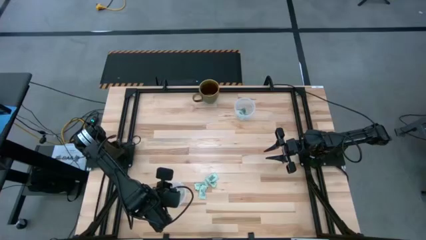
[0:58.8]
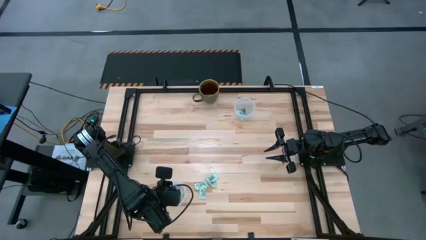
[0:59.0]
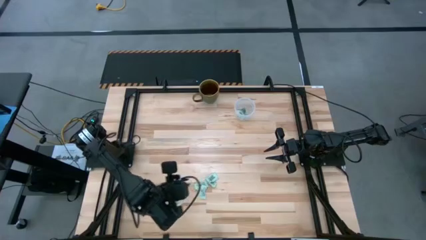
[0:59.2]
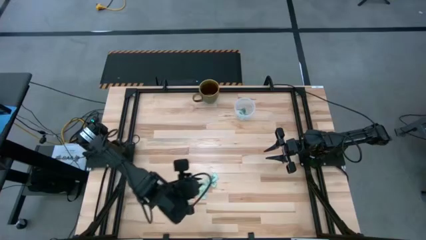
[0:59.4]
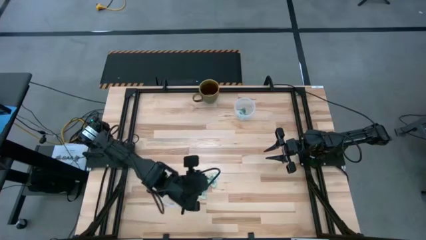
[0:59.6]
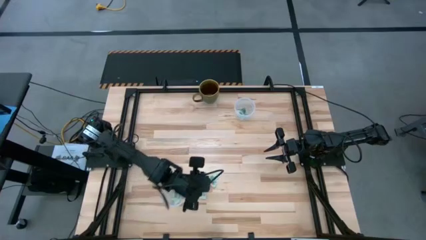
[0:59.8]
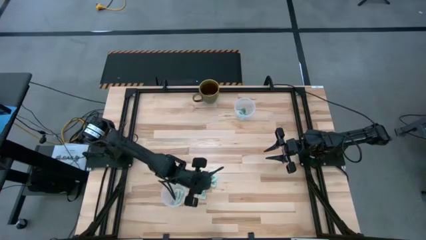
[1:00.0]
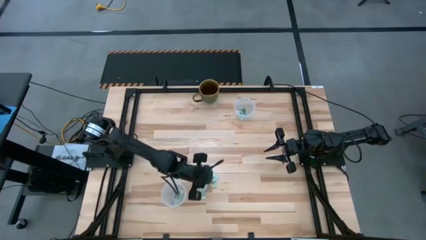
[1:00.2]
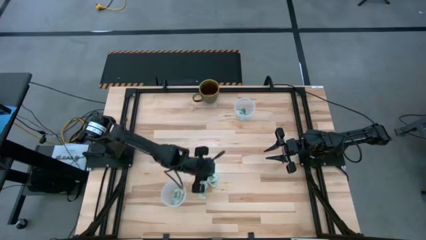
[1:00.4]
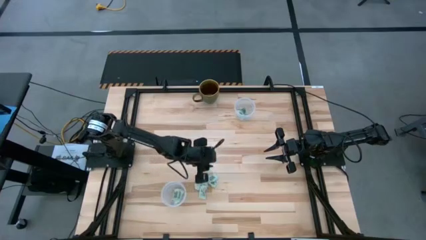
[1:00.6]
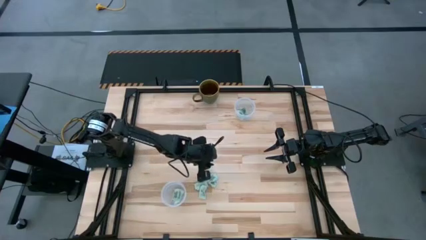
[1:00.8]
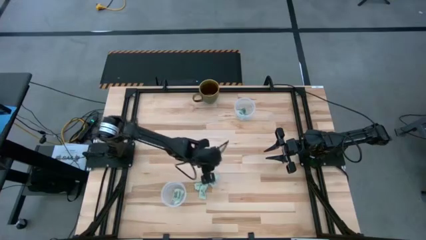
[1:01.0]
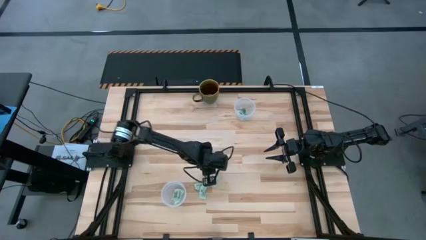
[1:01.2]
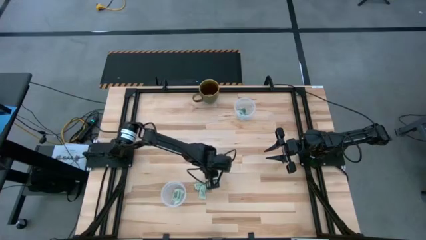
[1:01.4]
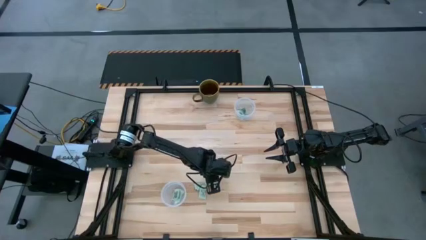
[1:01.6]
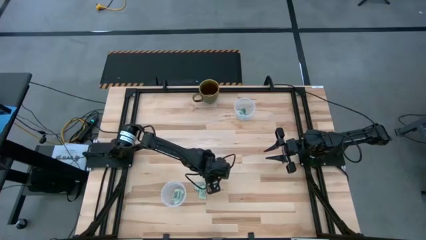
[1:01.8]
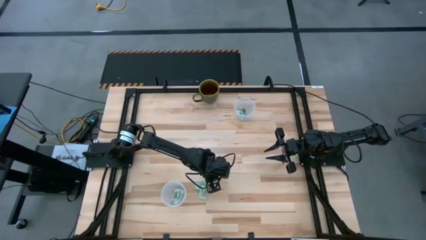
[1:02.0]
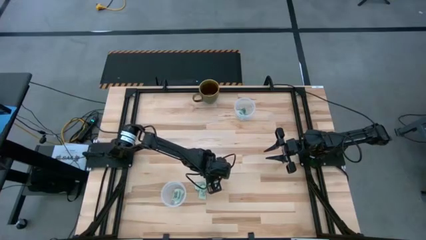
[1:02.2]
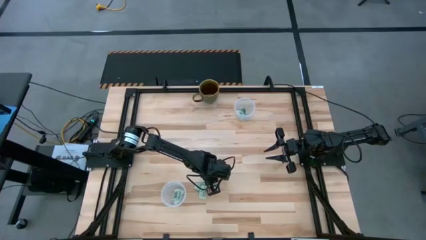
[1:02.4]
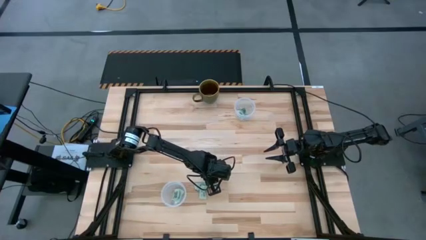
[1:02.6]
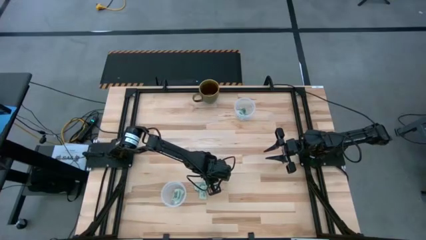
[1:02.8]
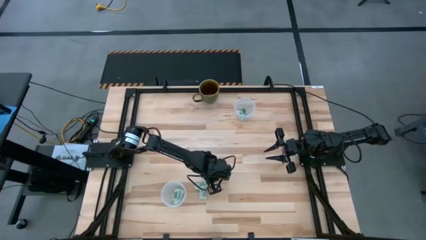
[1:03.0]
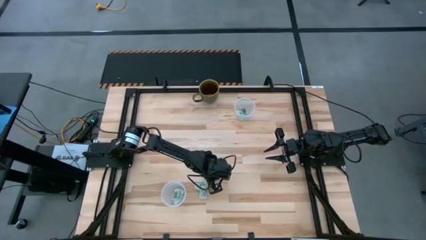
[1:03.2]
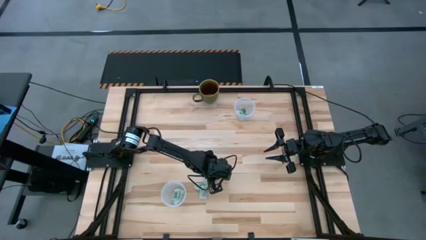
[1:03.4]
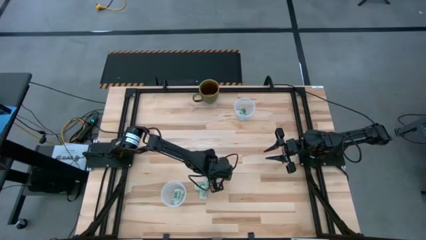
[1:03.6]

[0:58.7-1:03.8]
Task: Pick and place items into bin
Put the stevia packet into the bottom transparent bin

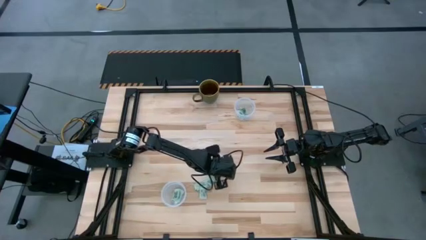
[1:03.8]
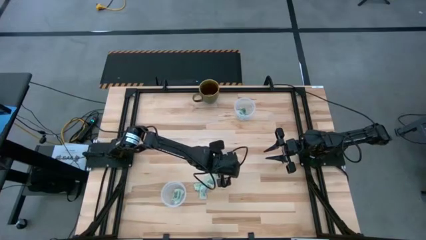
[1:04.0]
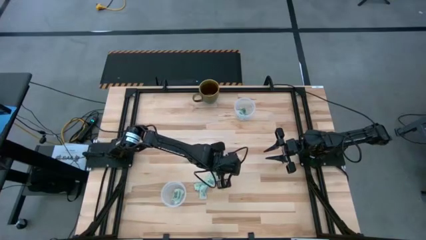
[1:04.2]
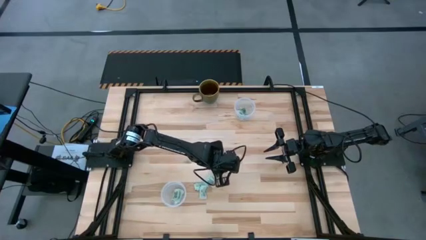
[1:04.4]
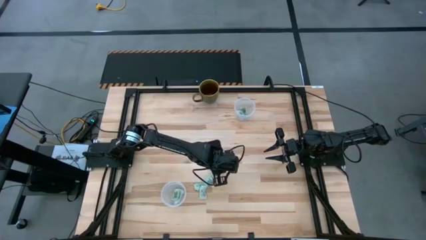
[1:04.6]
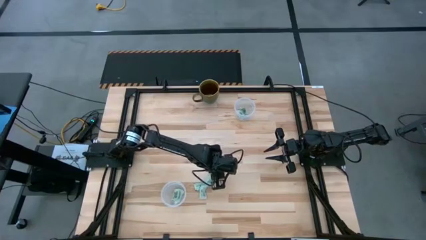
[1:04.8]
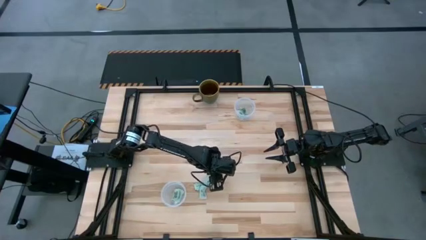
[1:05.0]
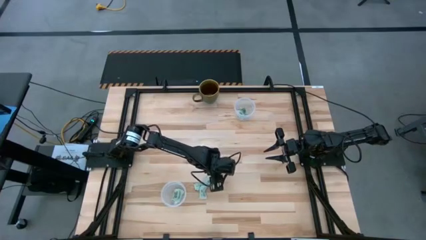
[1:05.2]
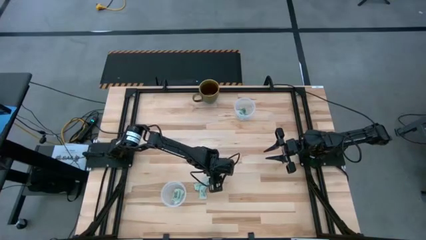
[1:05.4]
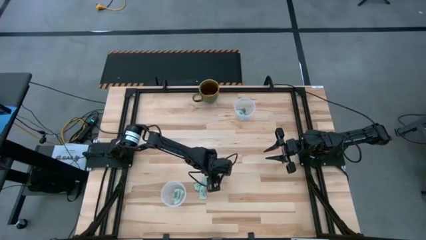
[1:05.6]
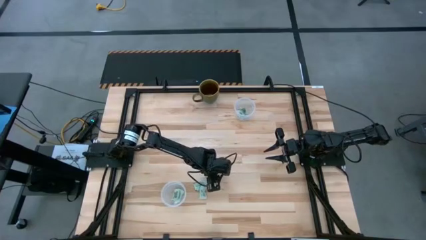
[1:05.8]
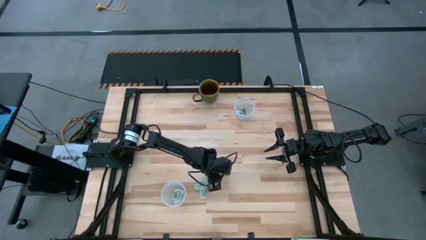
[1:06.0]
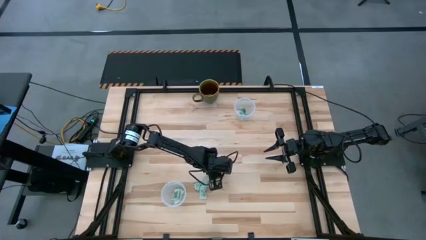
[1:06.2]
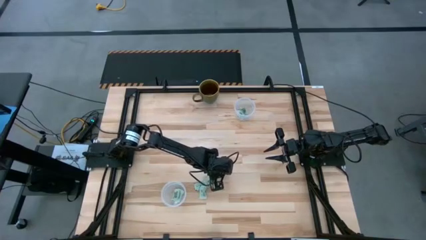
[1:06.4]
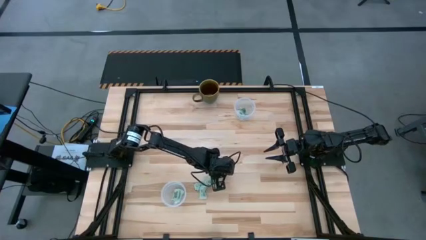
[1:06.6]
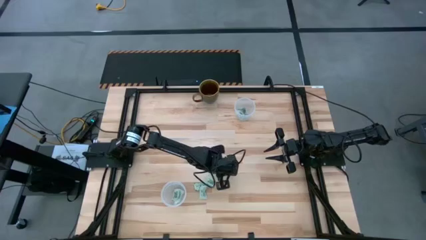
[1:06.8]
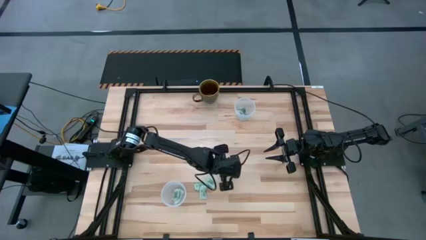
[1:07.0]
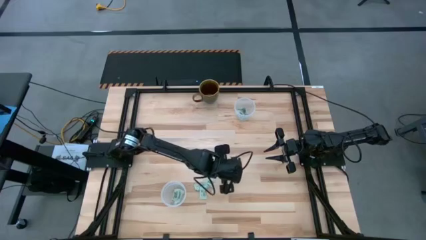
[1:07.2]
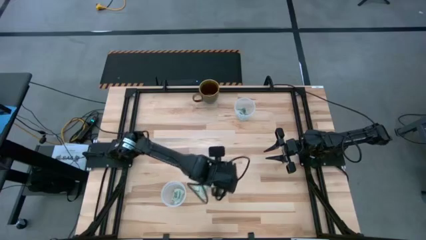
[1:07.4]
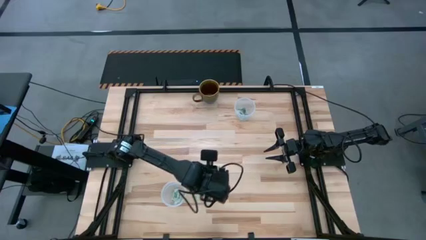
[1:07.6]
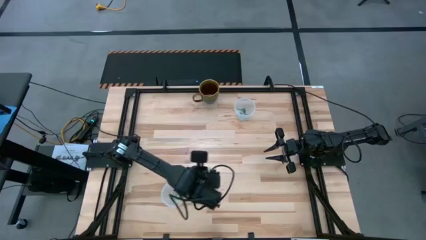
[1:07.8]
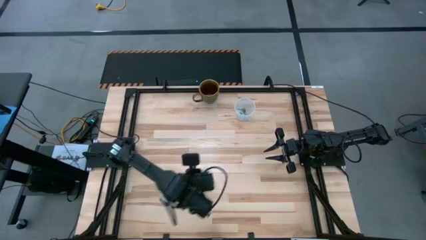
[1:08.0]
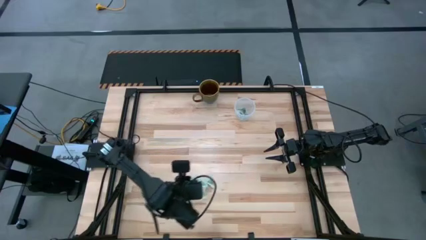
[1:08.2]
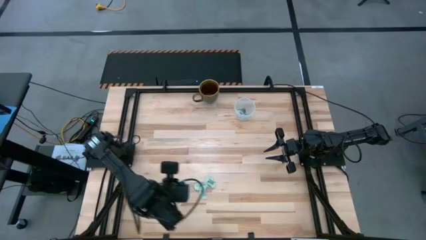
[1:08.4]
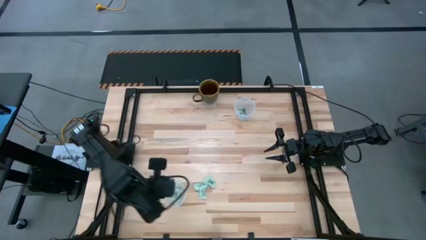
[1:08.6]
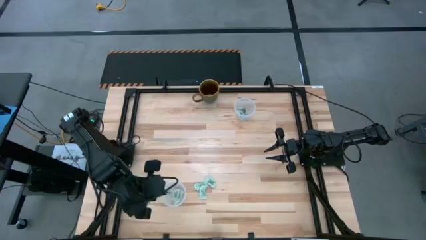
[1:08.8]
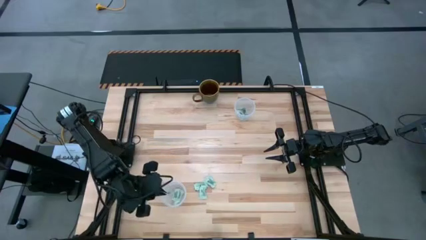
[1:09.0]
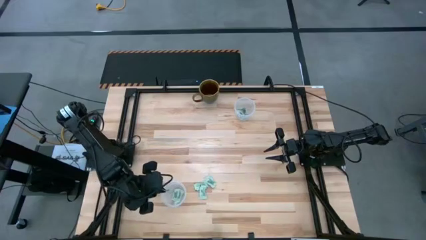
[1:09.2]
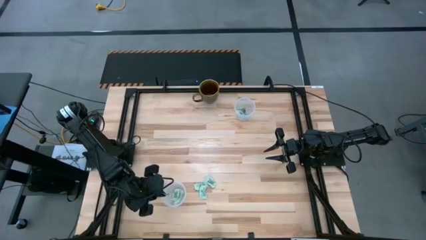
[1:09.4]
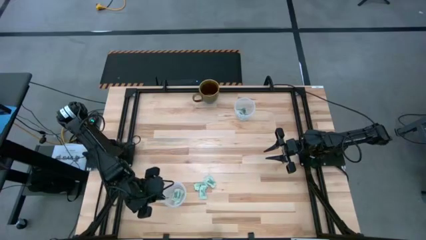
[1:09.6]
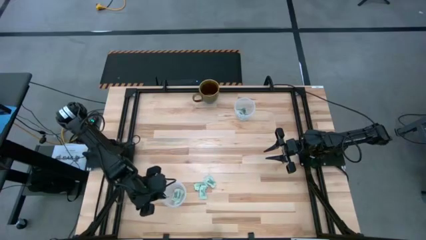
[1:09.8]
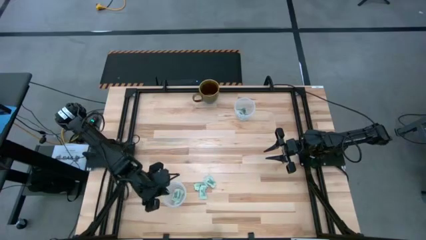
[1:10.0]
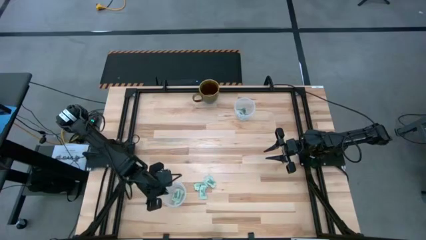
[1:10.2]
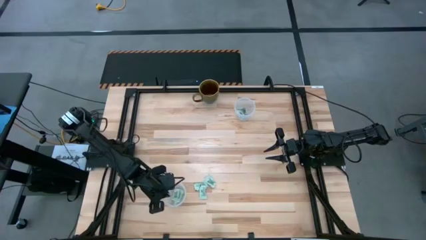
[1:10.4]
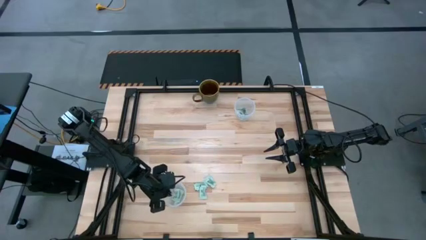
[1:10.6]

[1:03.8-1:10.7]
Put the stevia packet into the bottom transparent bin

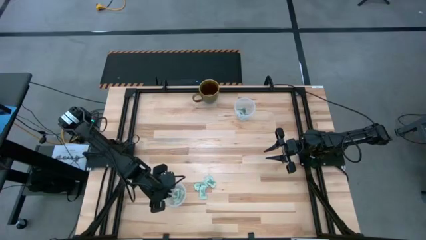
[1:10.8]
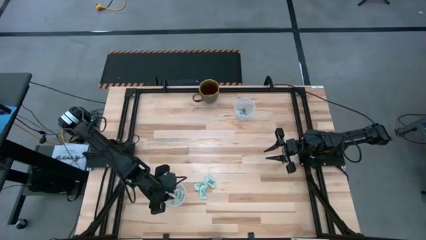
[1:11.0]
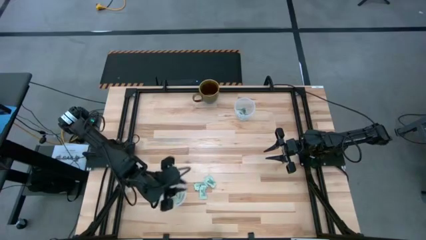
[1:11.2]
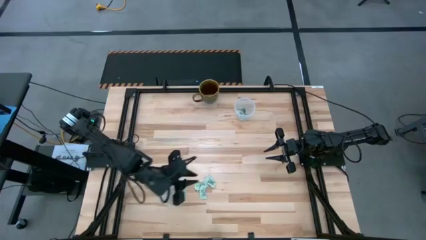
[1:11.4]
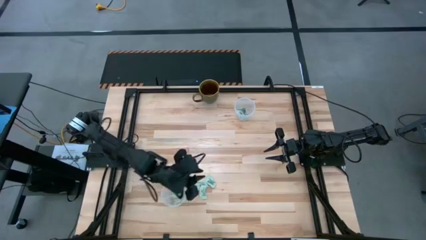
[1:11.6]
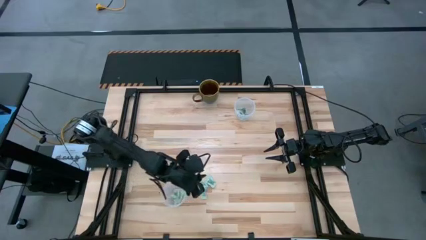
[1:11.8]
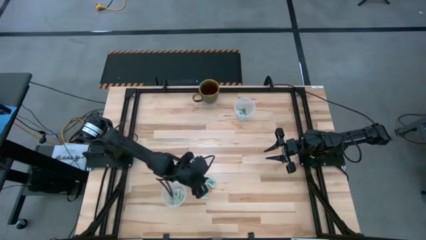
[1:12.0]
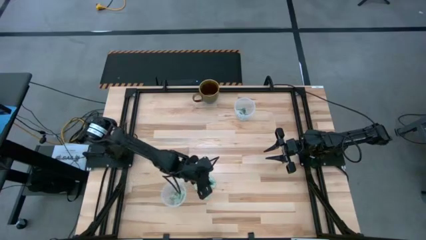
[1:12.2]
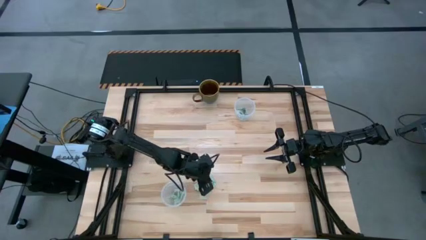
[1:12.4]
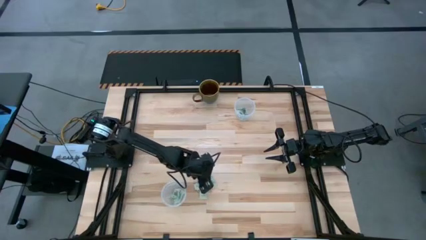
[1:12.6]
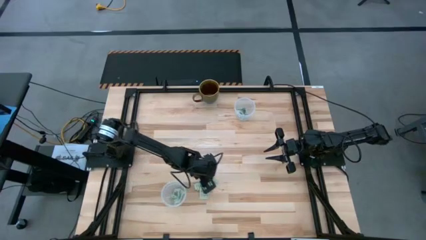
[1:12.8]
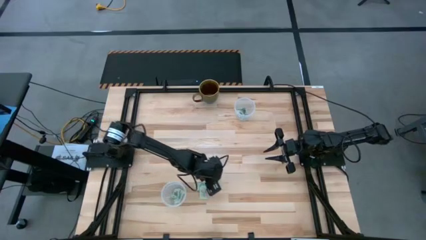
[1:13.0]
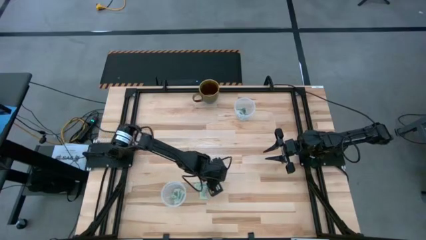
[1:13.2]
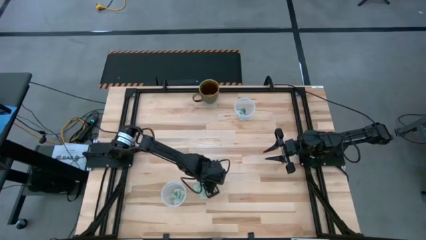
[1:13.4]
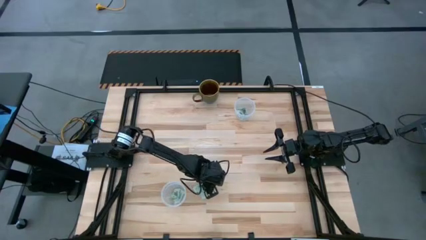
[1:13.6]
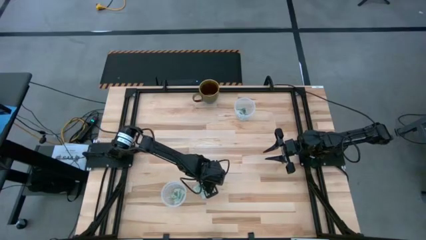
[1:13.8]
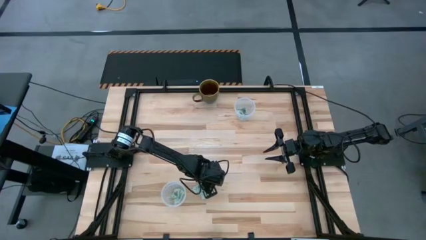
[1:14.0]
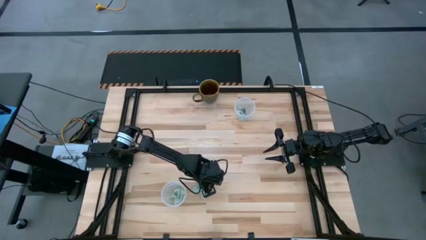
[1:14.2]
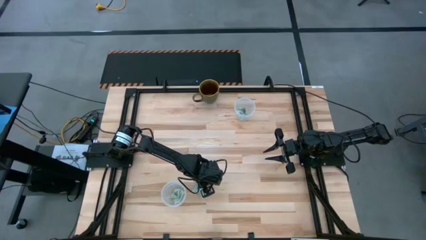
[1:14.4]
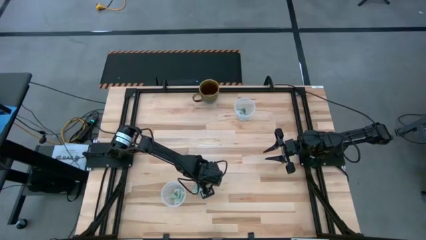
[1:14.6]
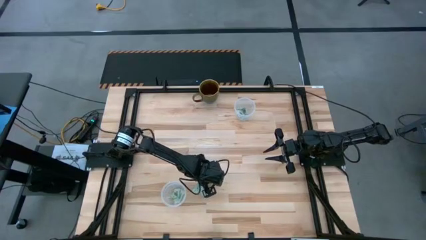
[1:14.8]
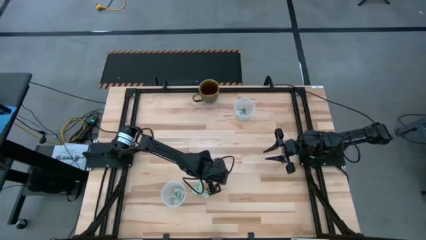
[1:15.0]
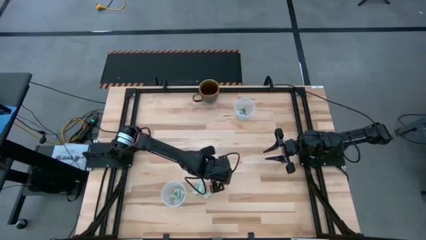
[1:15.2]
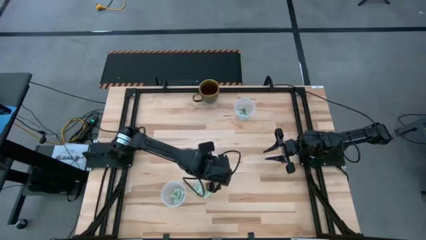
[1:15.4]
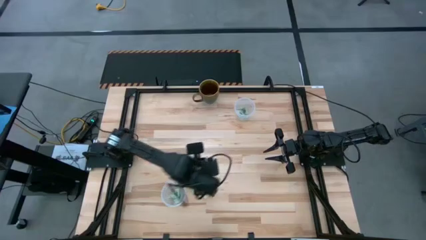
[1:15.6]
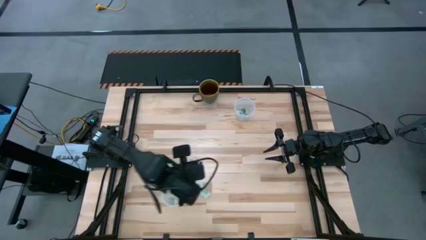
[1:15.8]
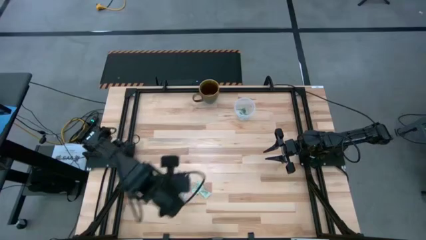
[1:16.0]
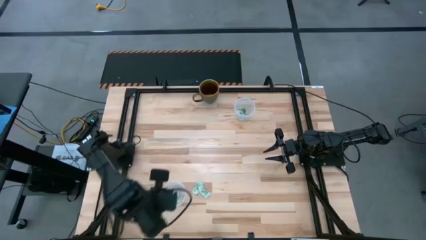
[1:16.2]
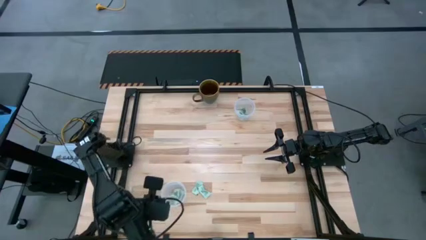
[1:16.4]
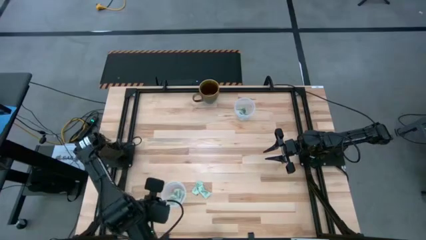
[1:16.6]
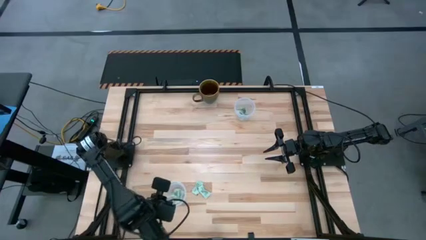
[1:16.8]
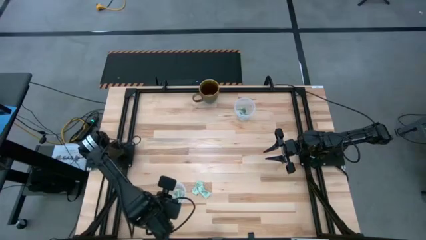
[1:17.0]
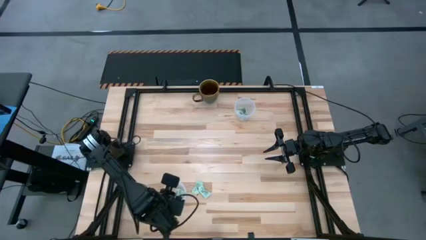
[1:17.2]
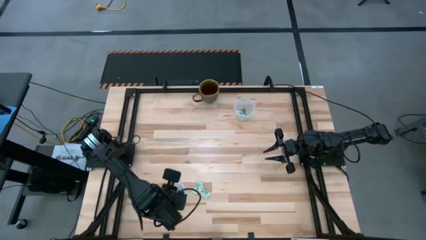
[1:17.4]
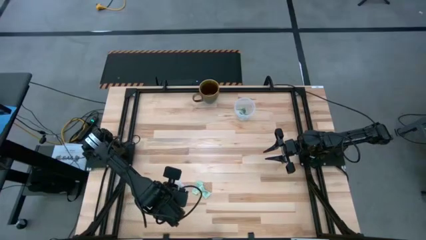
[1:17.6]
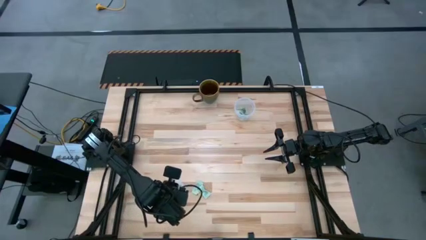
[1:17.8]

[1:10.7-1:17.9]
Put the top right stevia packet into the bottom transparent bin
